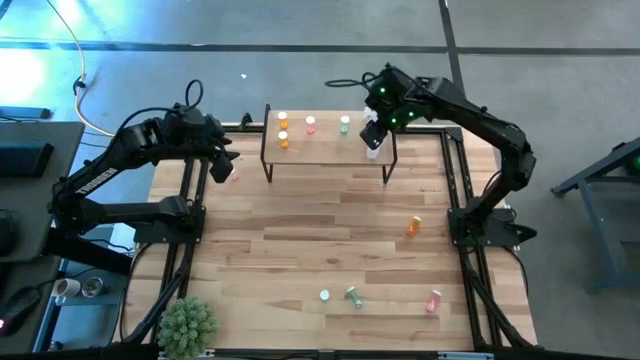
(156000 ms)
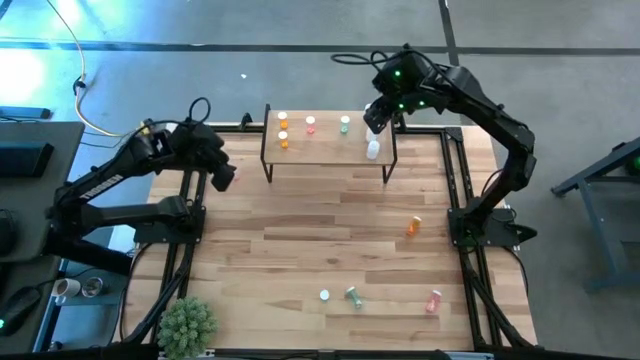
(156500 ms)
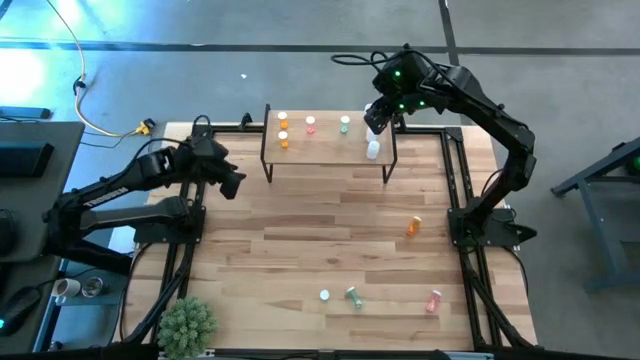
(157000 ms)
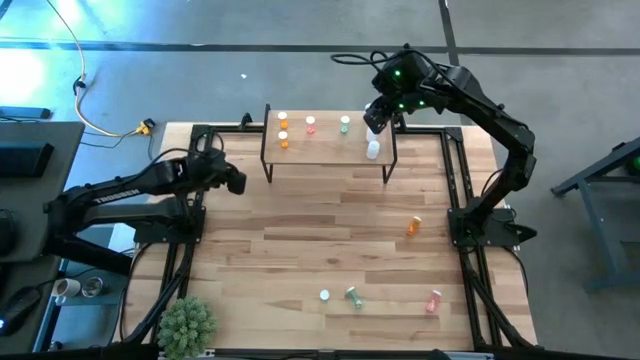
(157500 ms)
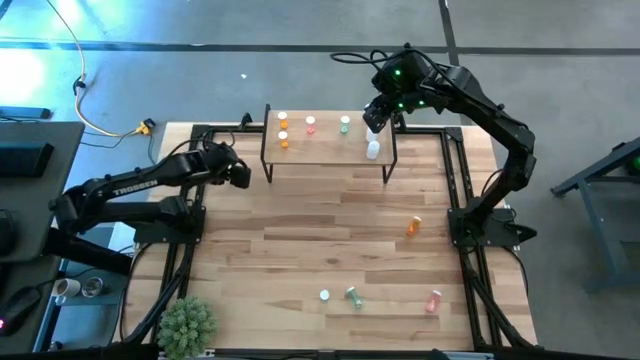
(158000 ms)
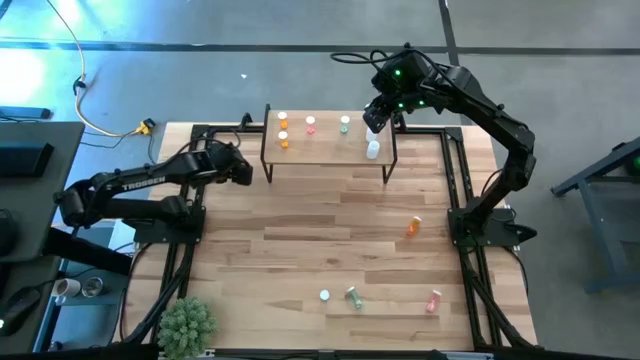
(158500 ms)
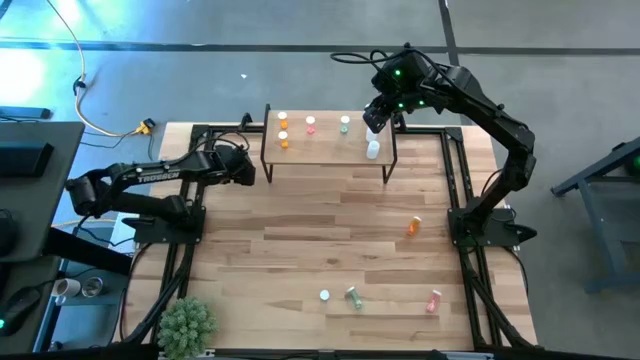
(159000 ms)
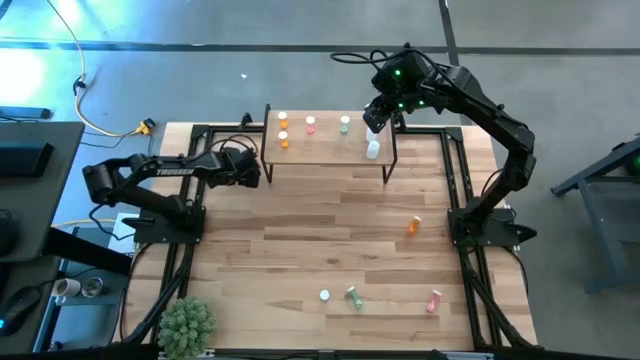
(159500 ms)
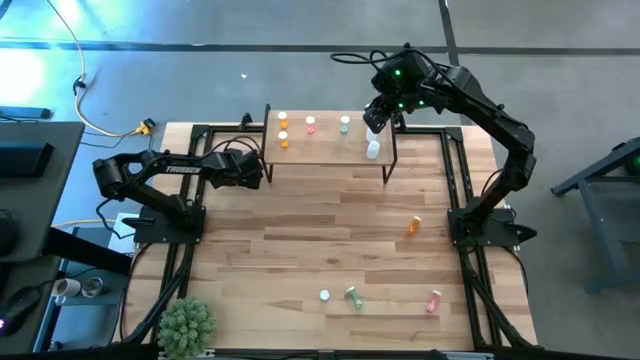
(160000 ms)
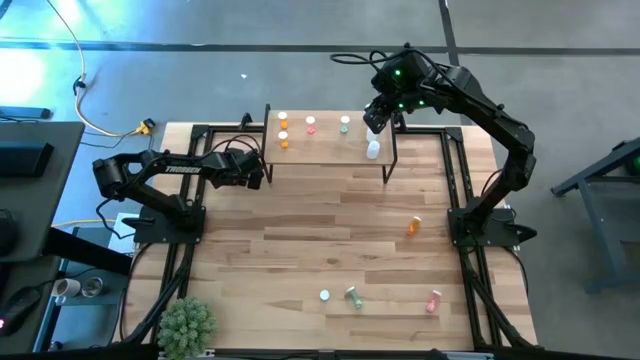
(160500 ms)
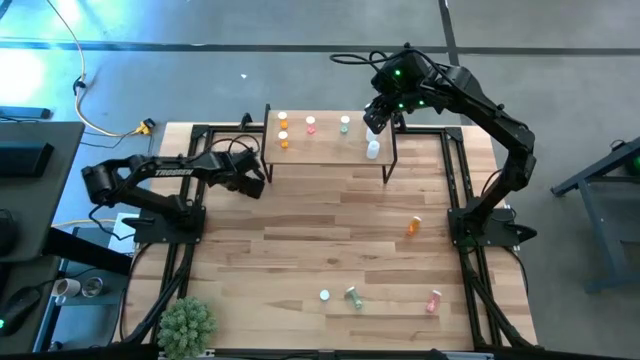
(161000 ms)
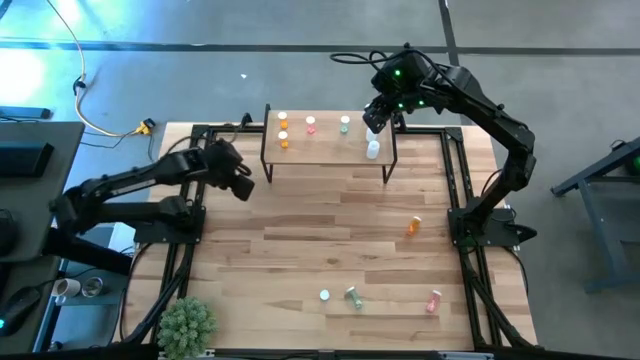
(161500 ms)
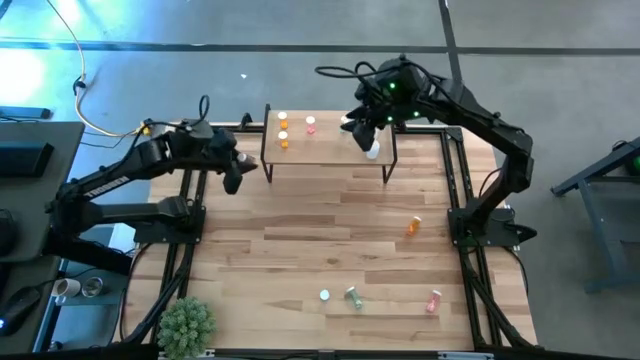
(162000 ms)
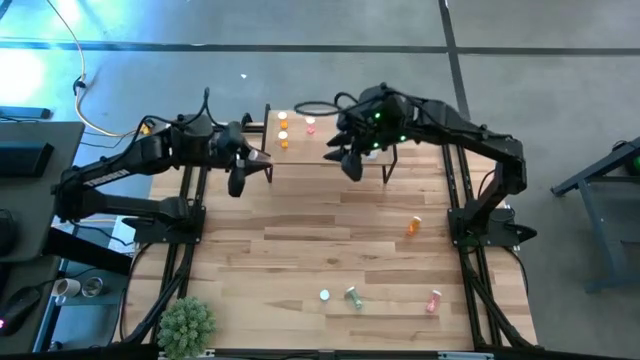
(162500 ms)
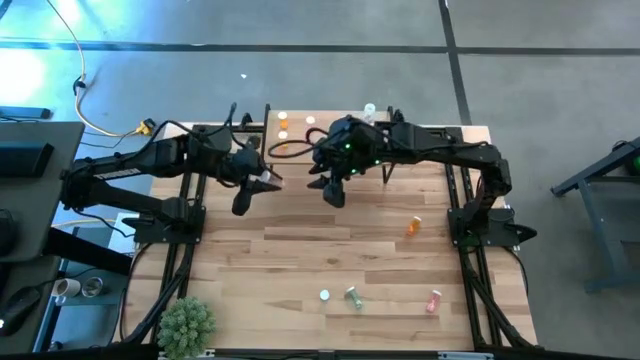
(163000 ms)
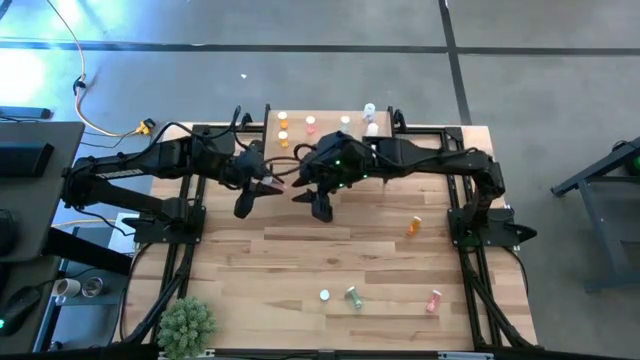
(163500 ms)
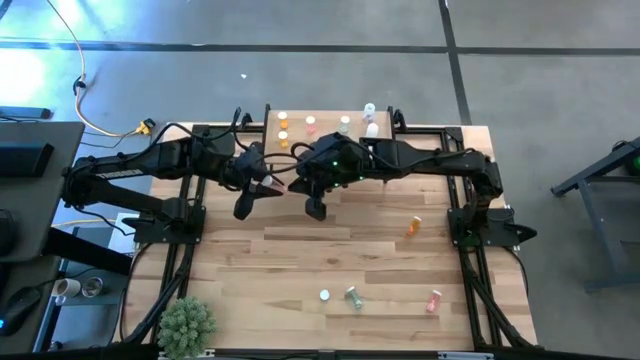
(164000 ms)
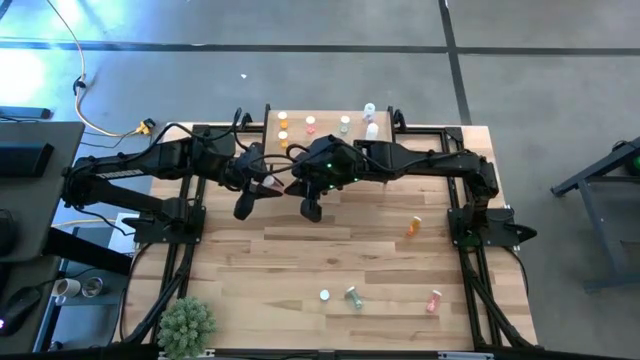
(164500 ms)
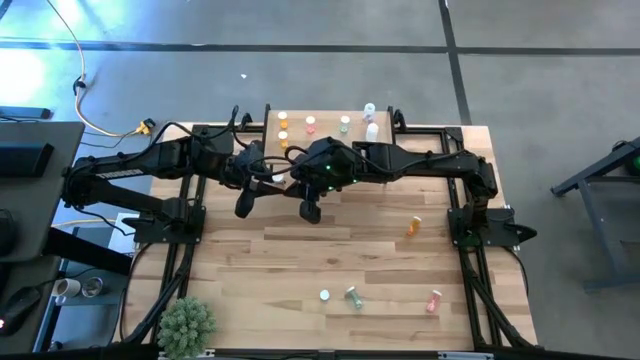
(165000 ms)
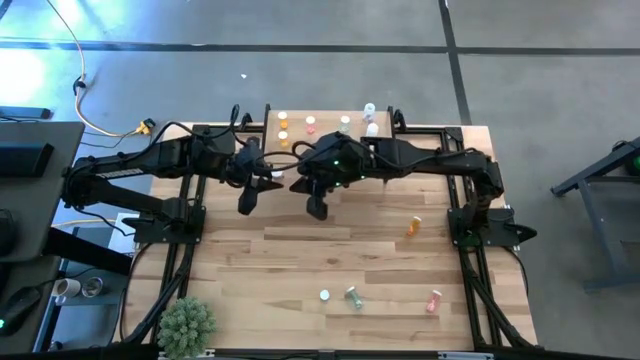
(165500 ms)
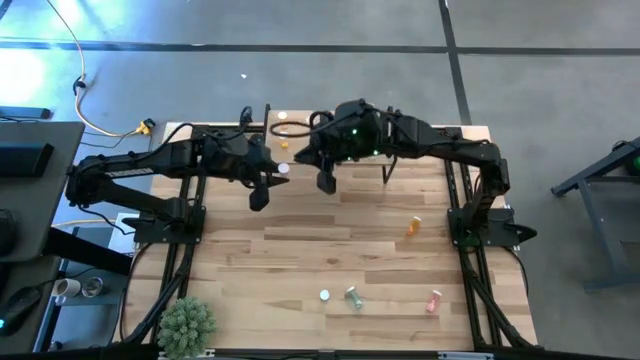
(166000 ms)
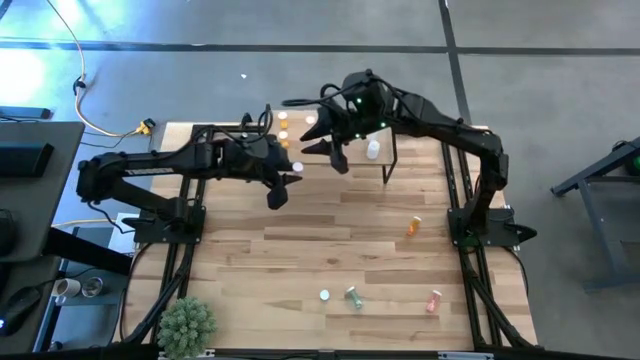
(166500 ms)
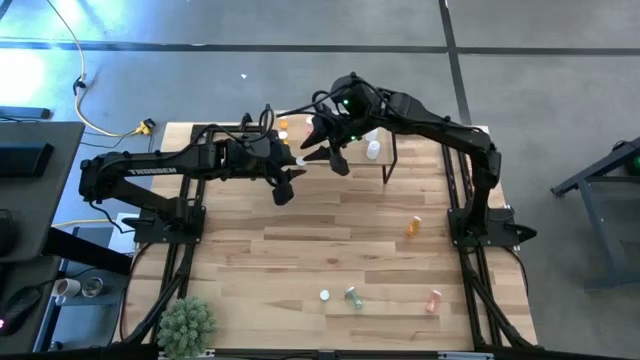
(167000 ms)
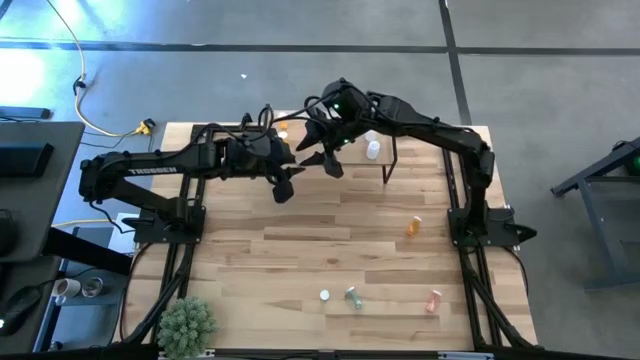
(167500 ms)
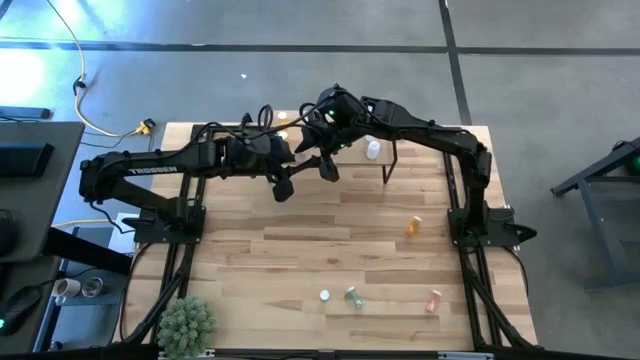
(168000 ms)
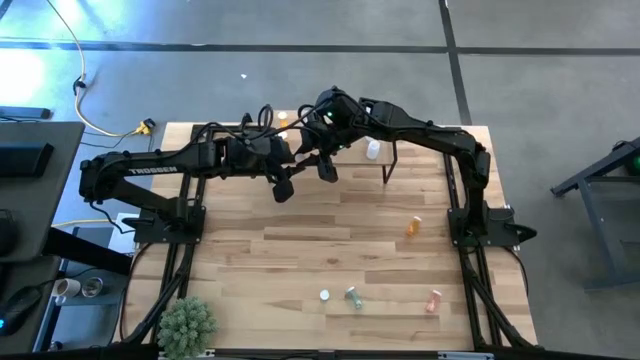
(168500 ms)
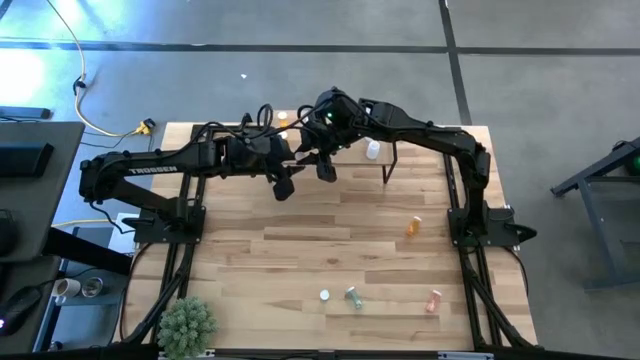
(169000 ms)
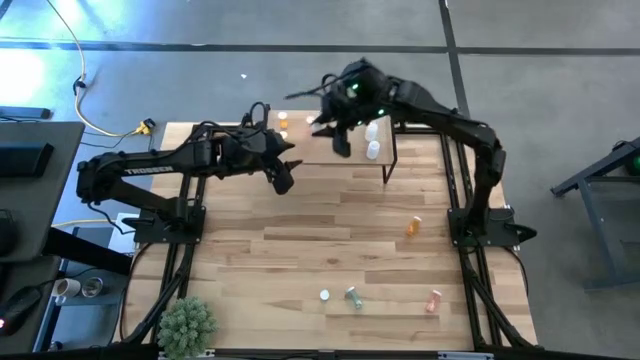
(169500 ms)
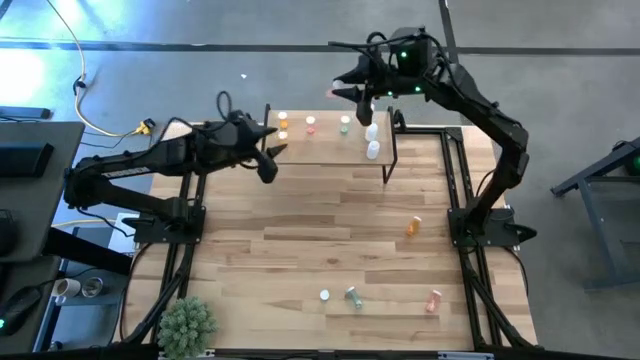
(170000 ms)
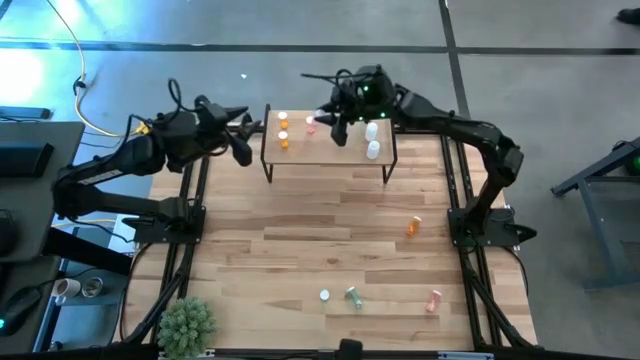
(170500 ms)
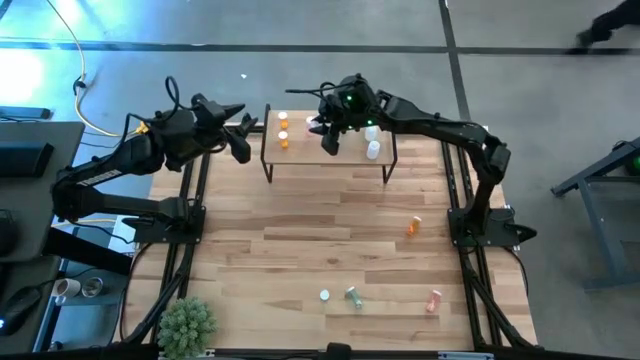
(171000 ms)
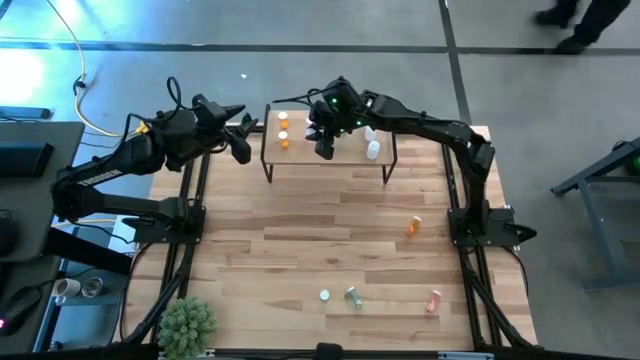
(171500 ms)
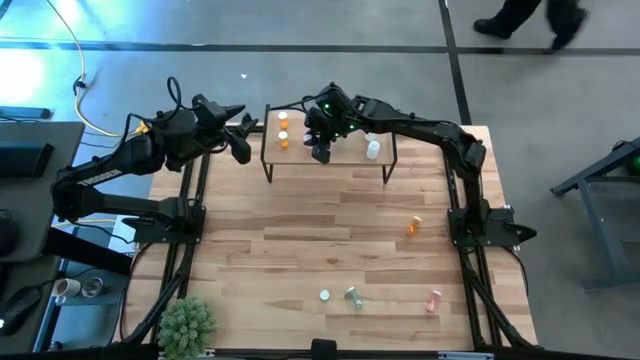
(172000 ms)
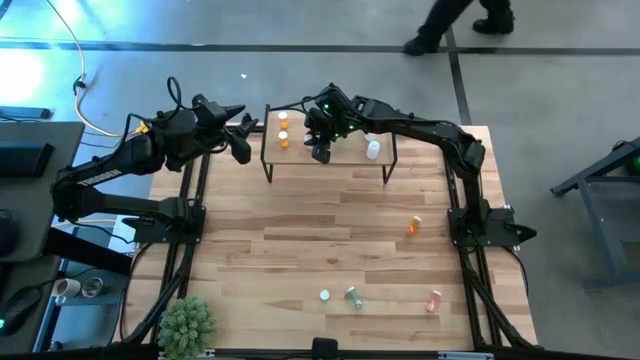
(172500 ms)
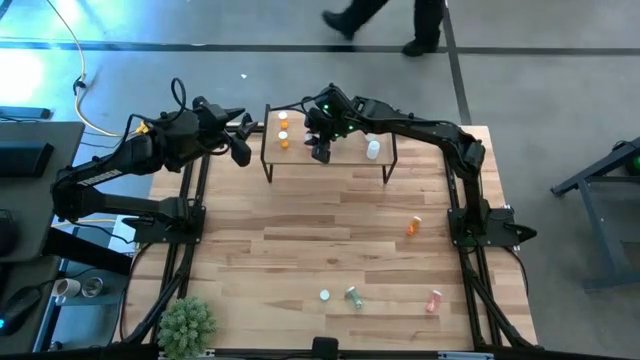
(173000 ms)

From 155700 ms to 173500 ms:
Task: Pick and place medicine bottles onto shelf by color
Put the top pink pill bottle on the shelf aligned with the pink pill bottle

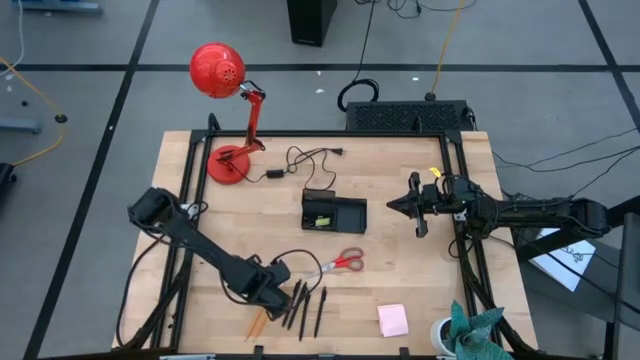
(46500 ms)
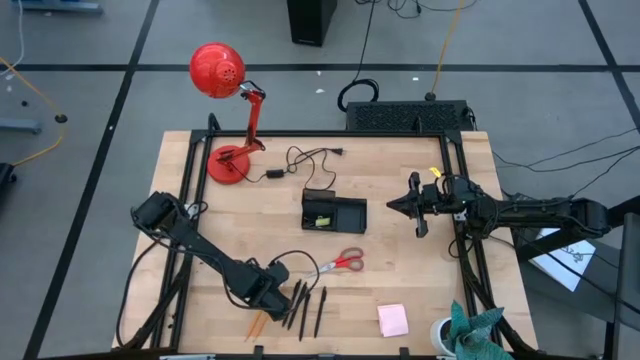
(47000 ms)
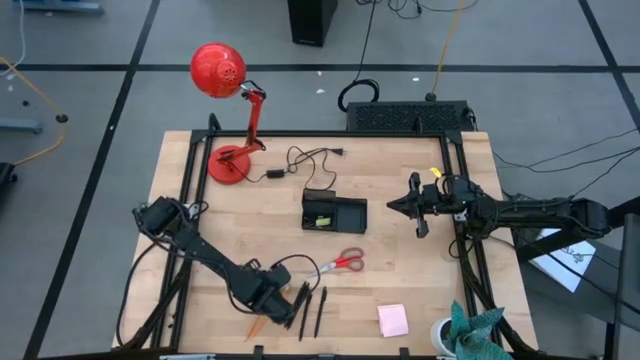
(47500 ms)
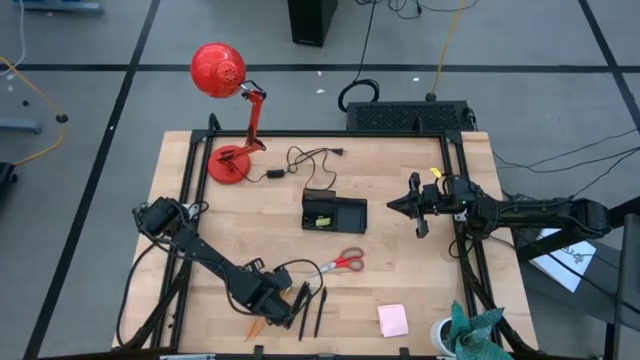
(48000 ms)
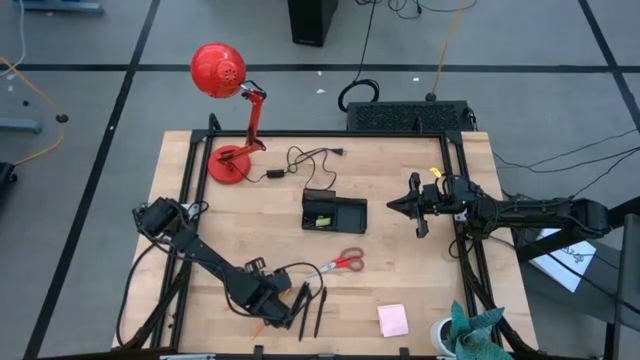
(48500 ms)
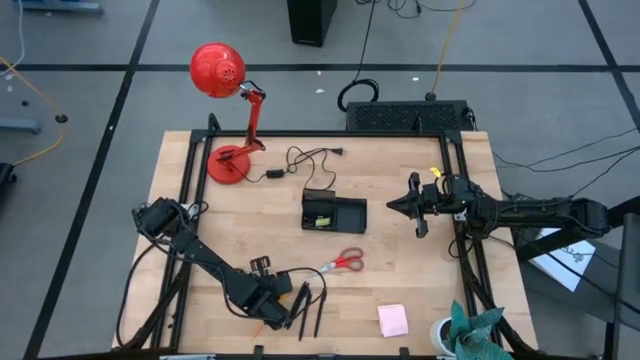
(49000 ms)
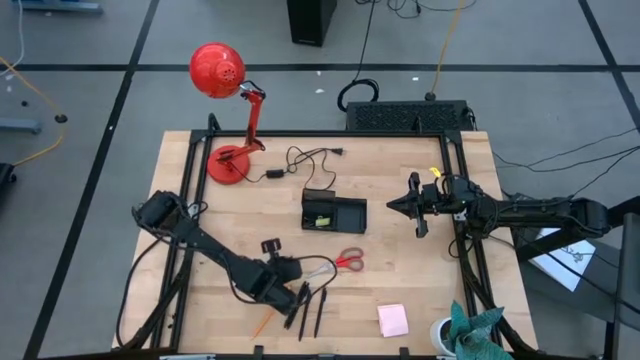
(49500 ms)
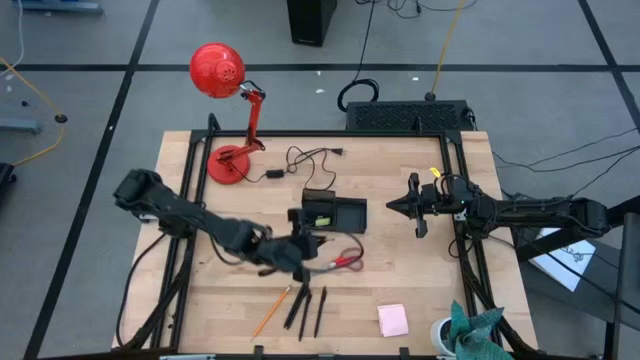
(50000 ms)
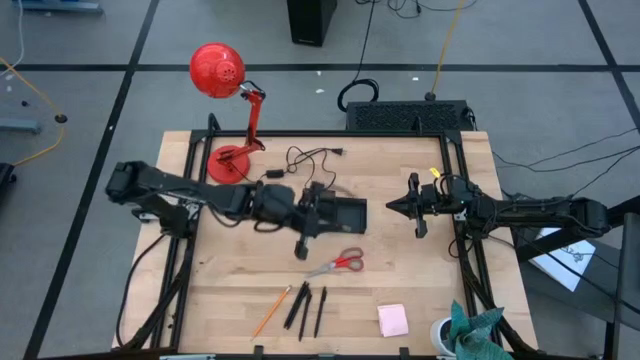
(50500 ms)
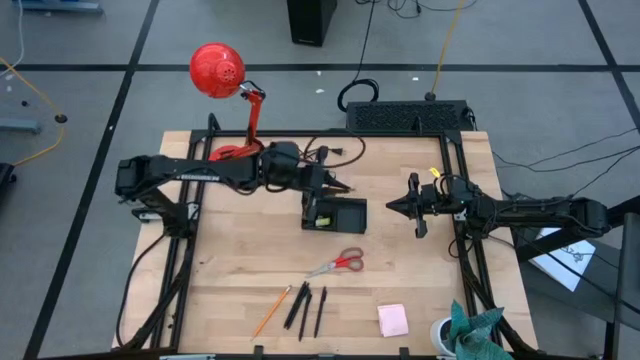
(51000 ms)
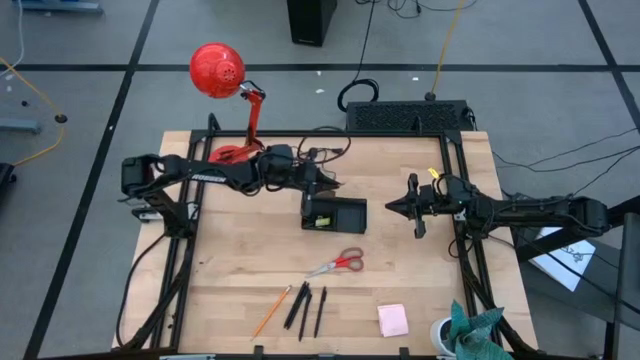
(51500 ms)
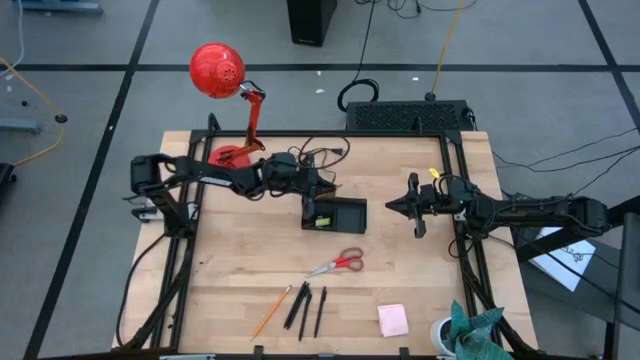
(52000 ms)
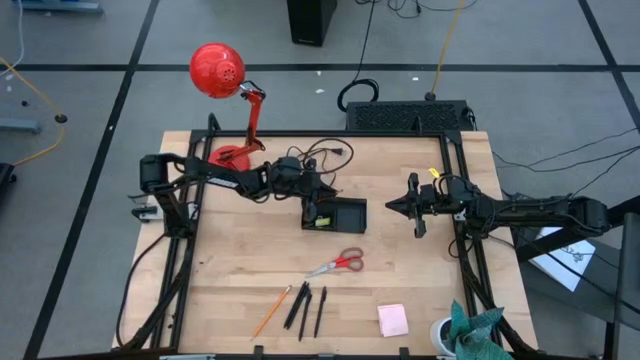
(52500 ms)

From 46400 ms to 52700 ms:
Task: Pick and place office supplies into organizer
Put the left orange pencil into the black desk organizer
